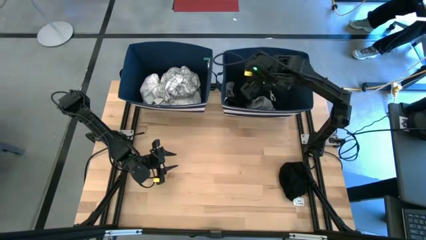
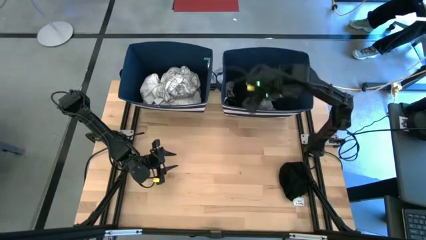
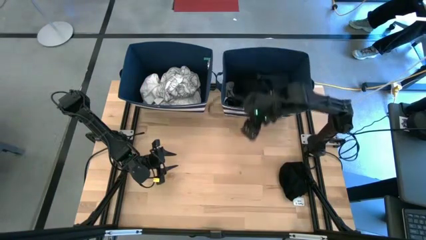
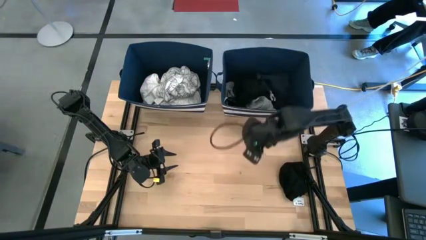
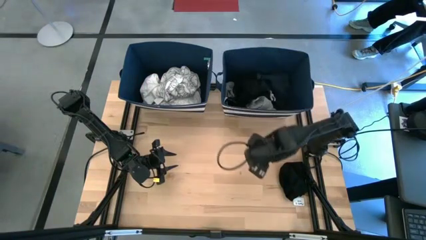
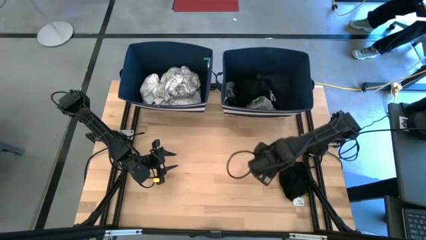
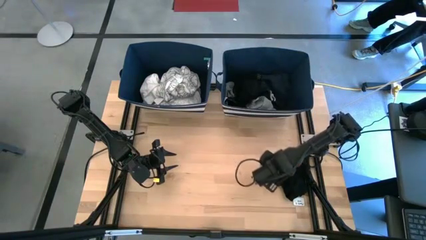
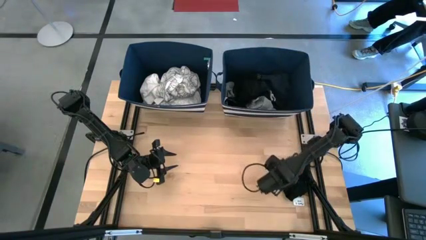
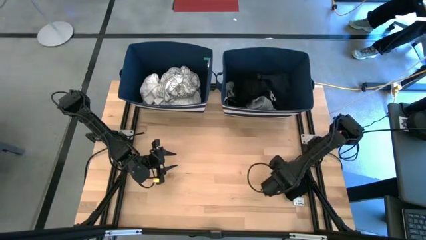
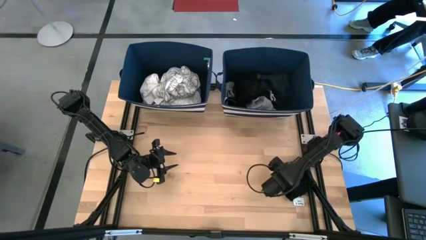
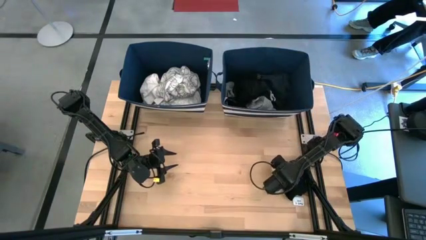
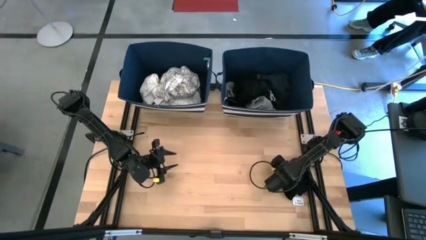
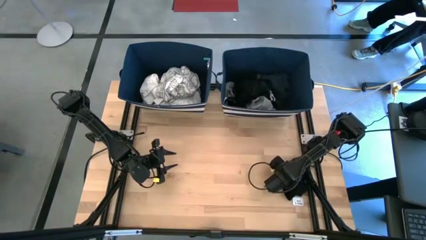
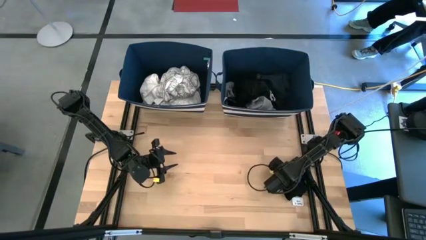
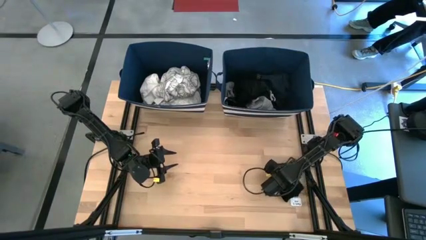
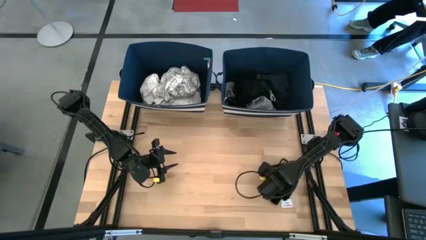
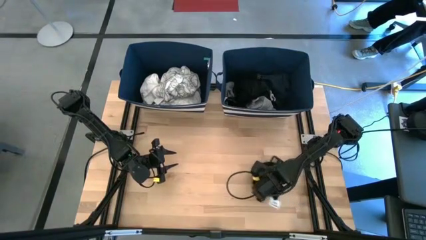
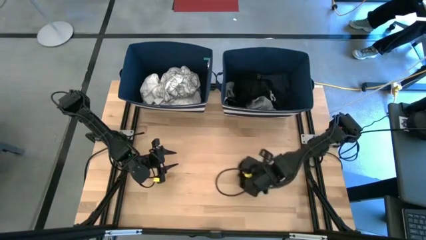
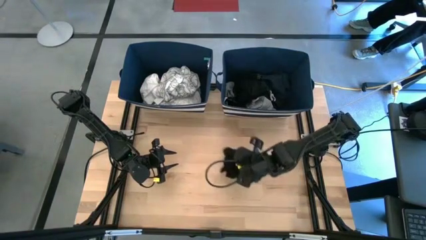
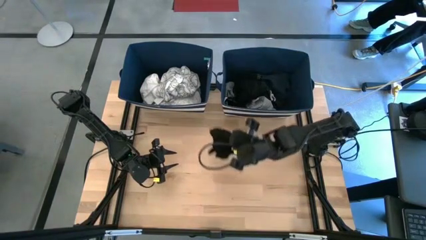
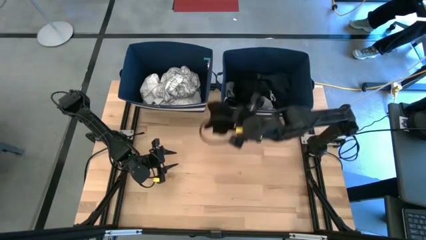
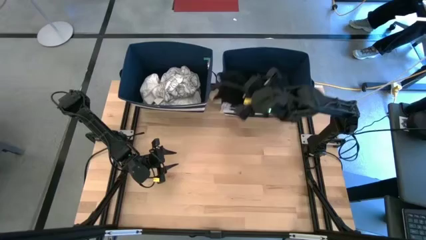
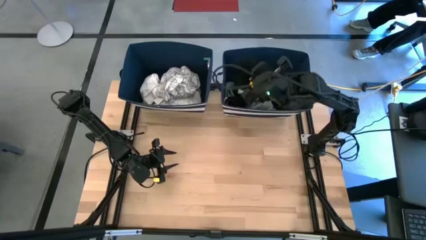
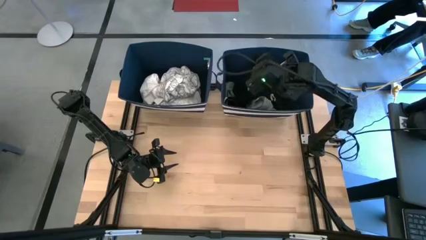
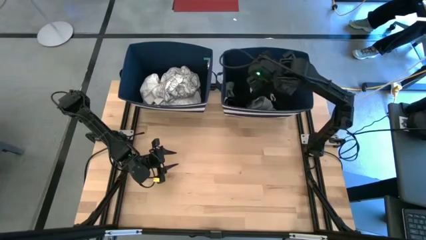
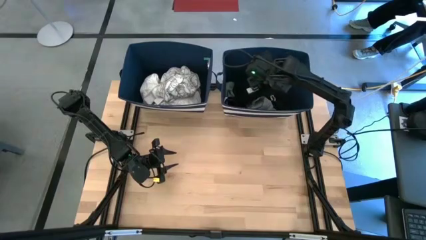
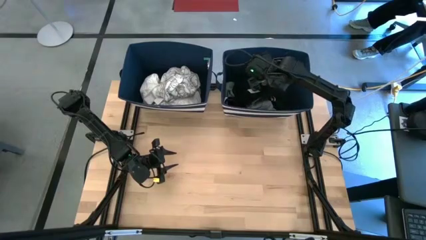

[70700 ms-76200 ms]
Task: Sort clothes
Put the black underwear into the left laundry organizer

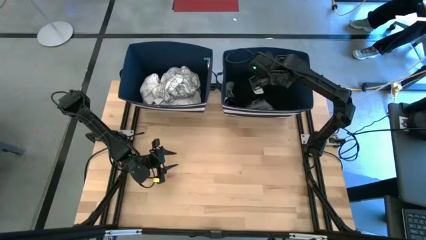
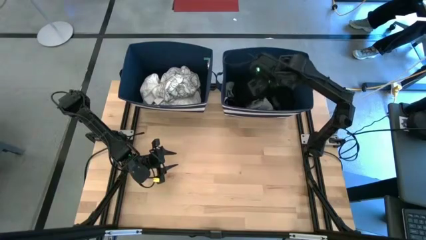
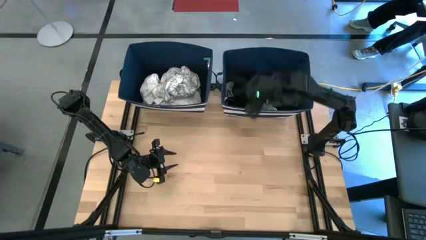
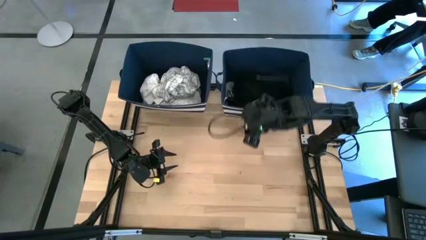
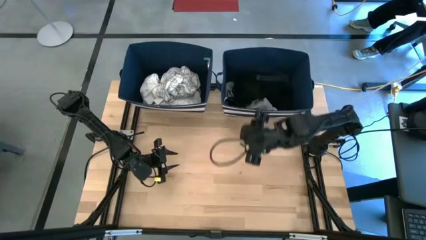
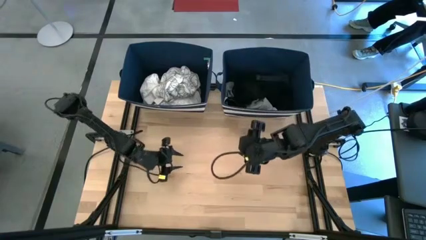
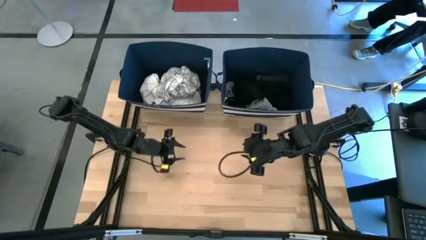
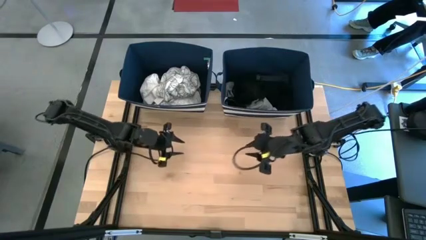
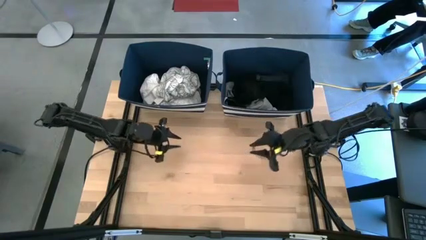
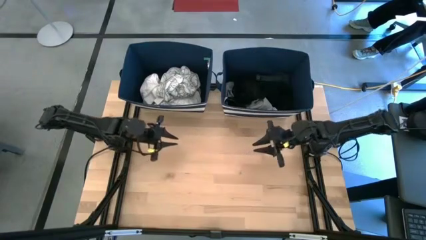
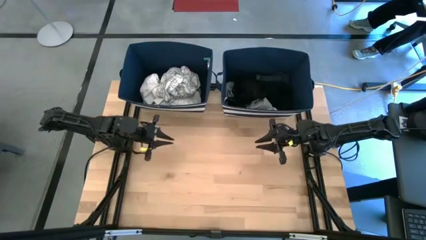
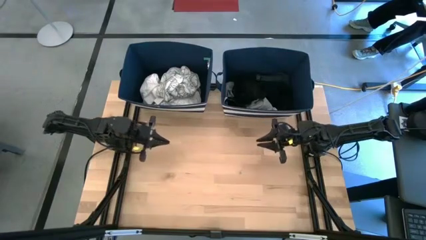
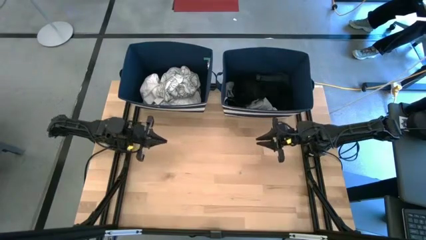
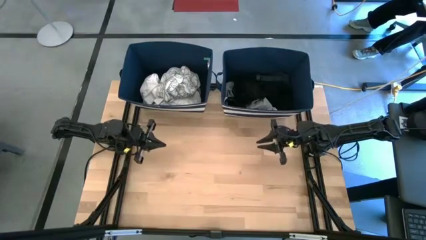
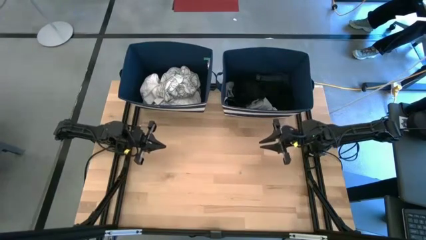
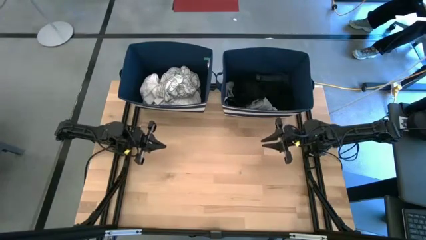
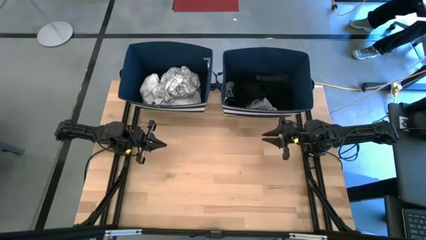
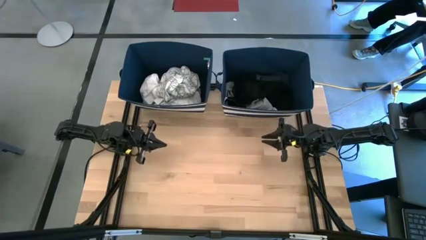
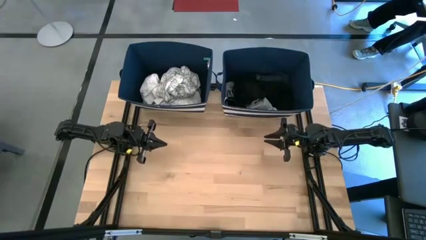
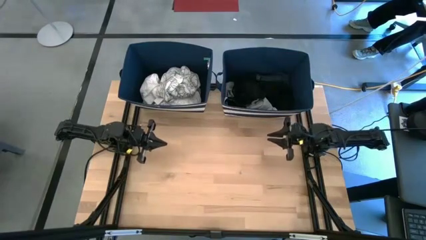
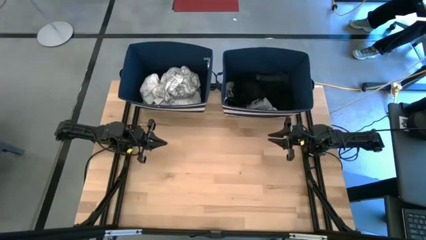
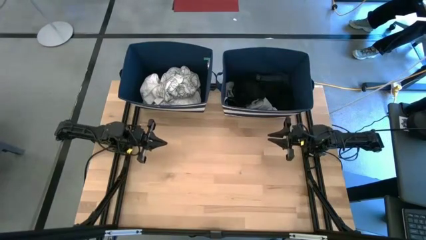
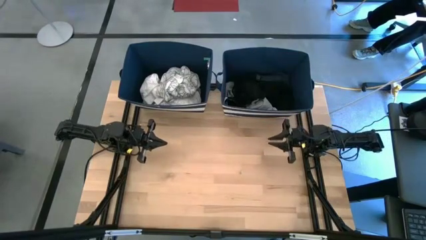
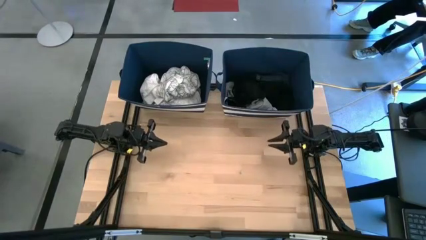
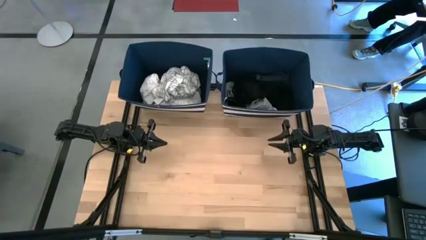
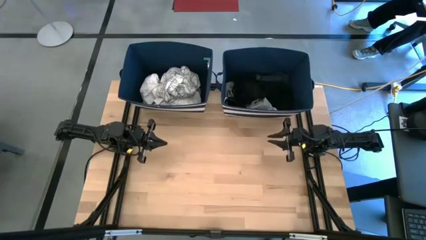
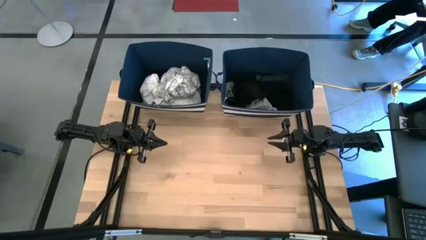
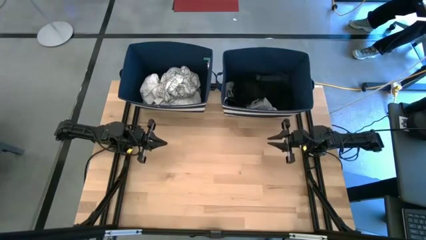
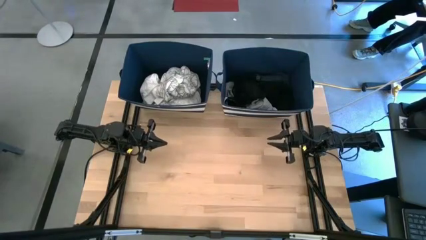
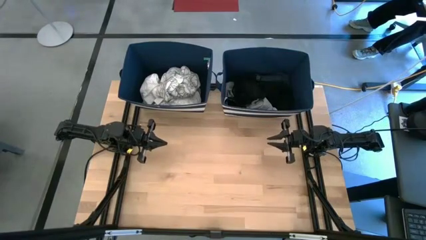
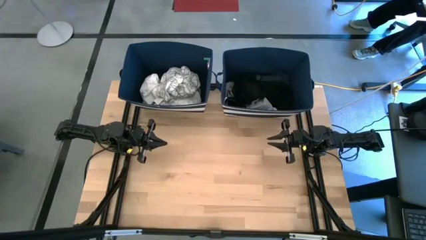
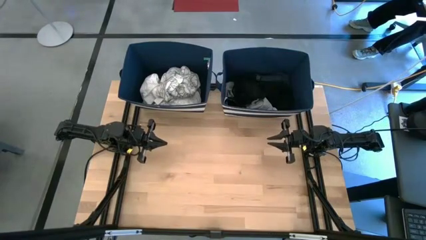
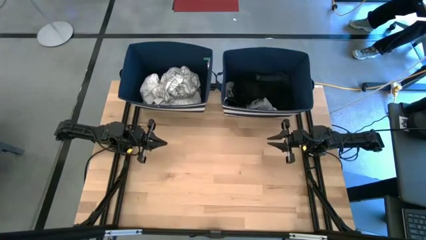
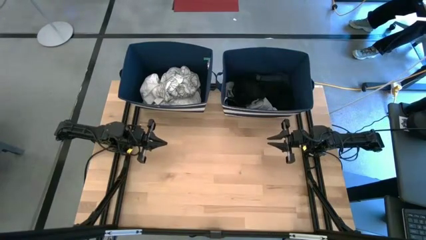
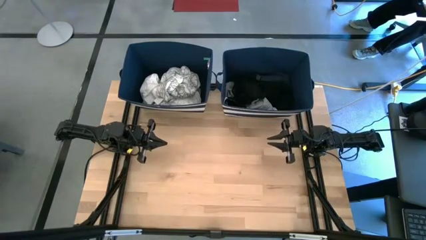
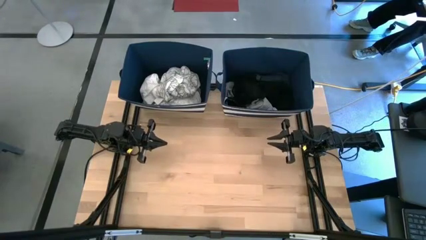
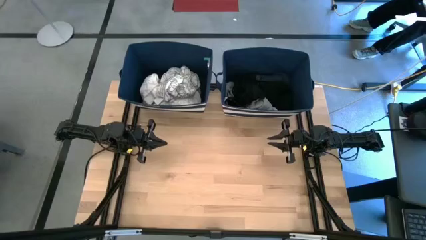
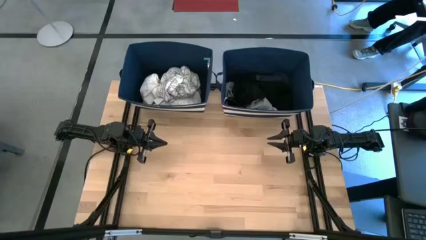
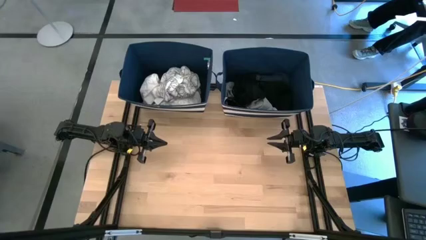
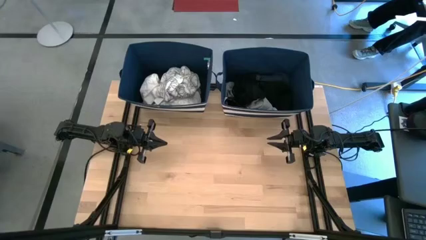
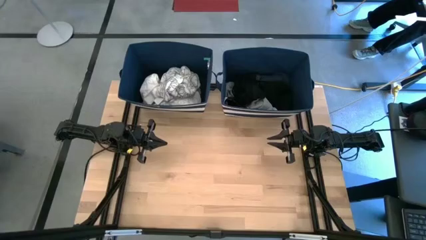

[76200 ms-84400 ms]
Return to Home Position

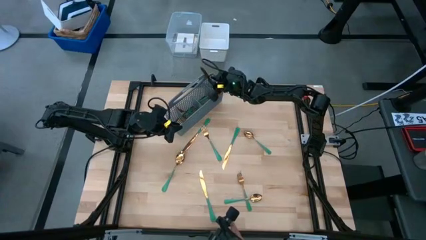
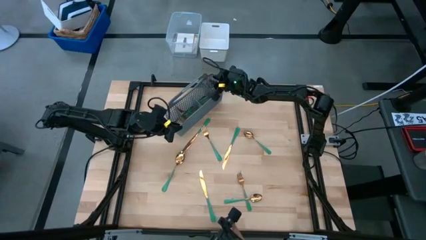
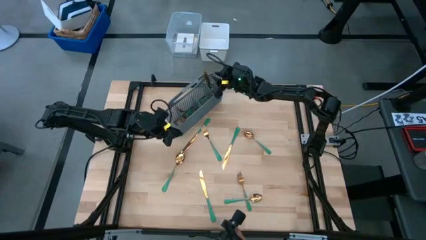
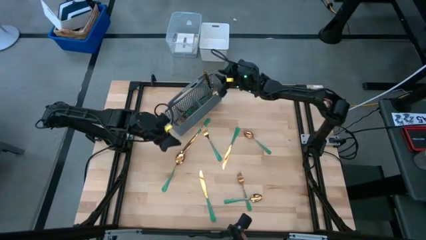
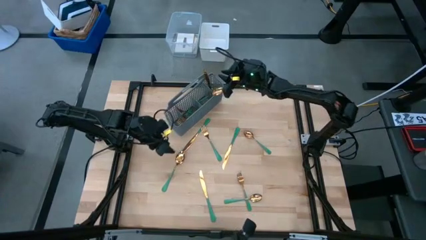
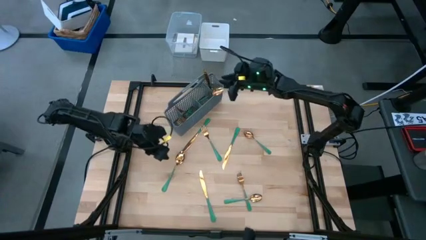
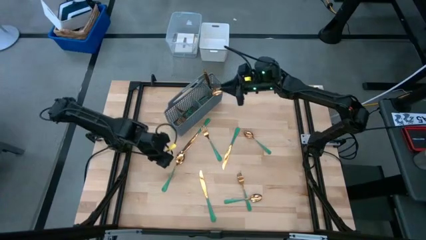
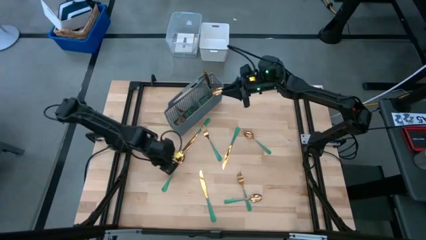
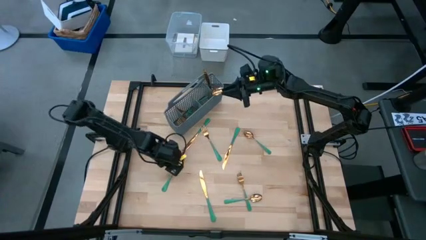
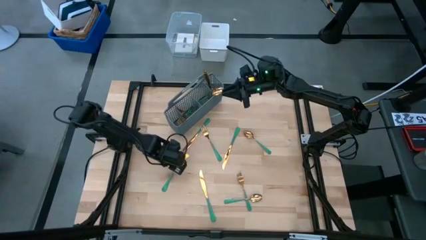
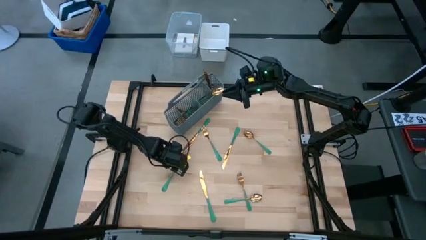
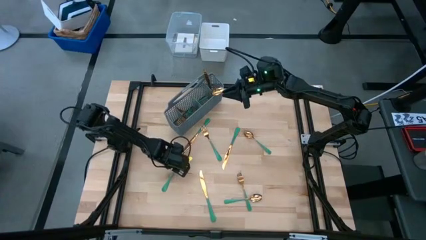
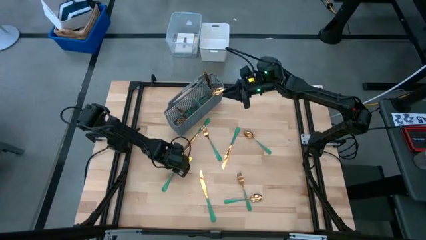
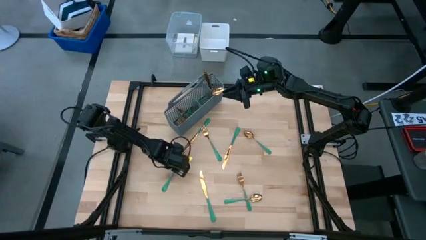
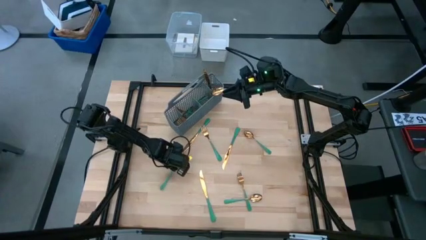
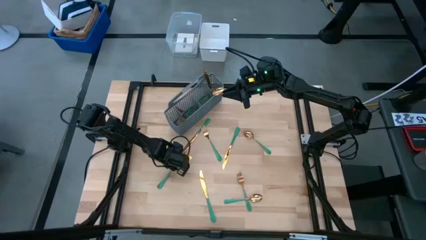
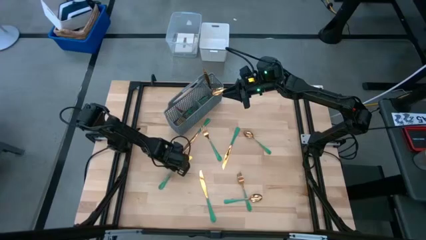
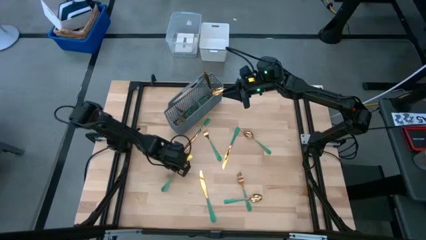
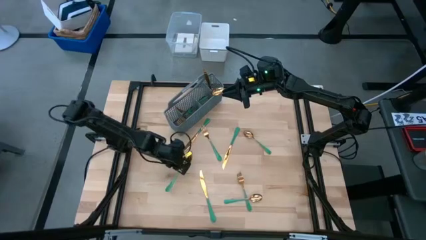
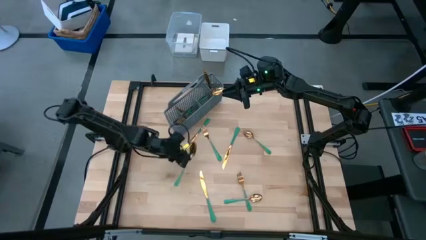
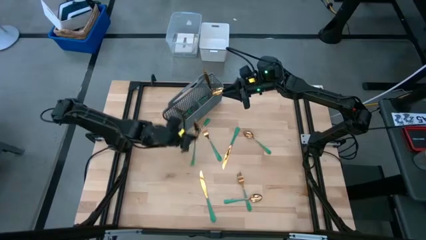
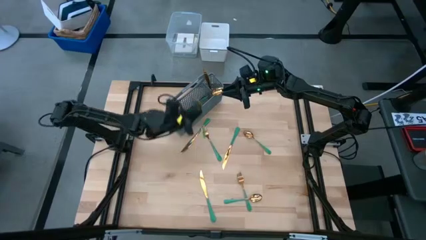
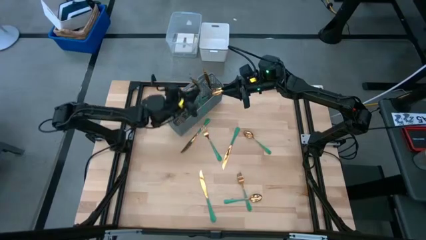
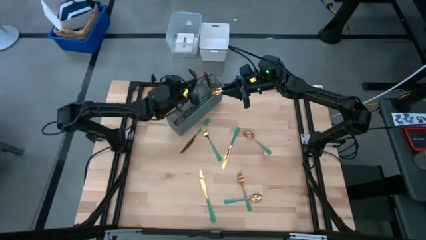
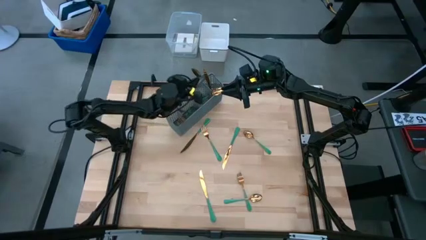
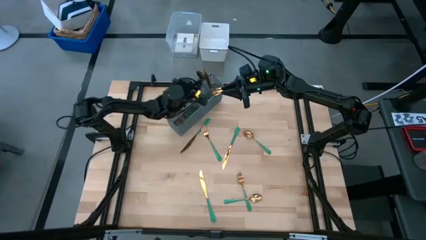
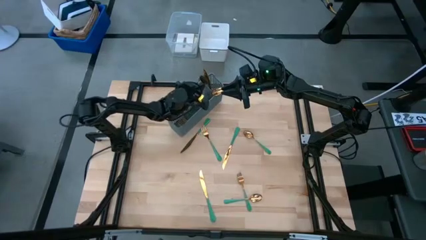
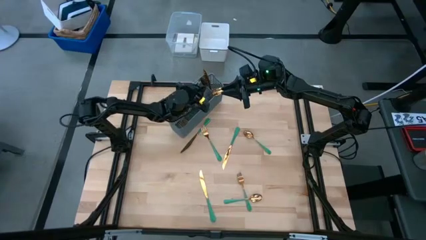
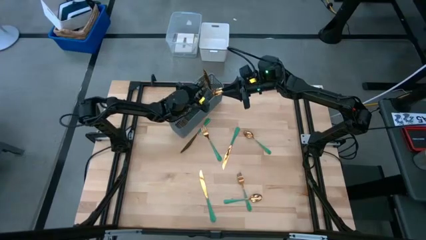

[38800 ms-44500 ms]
Task: Sort silverware
Put the middle left green-gold spoon into the silverware basket
